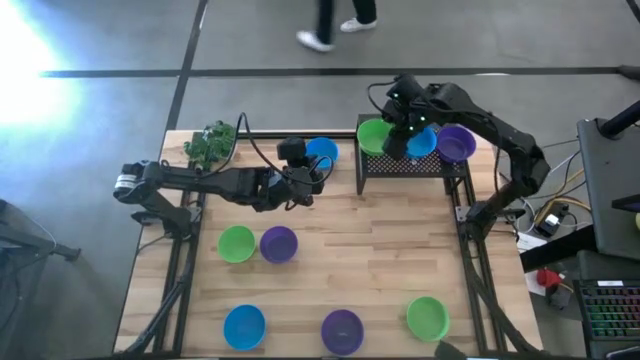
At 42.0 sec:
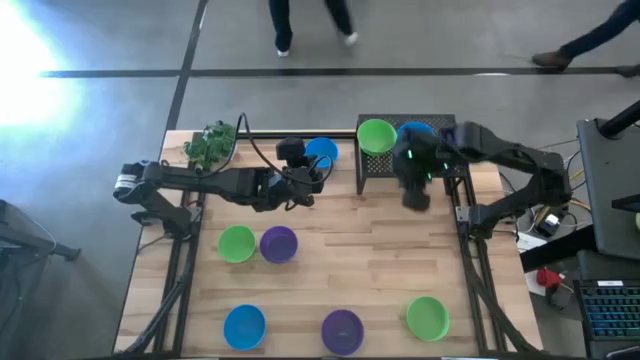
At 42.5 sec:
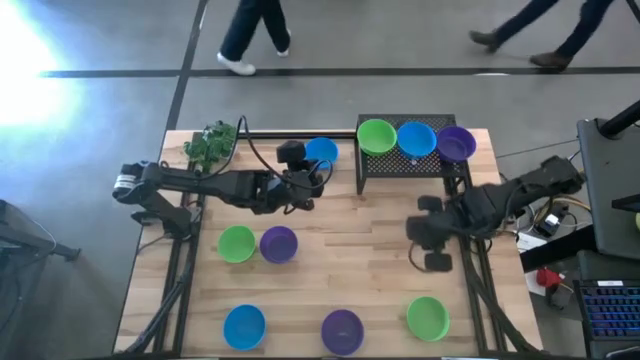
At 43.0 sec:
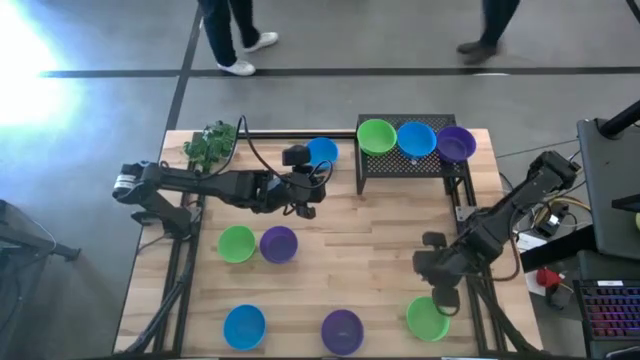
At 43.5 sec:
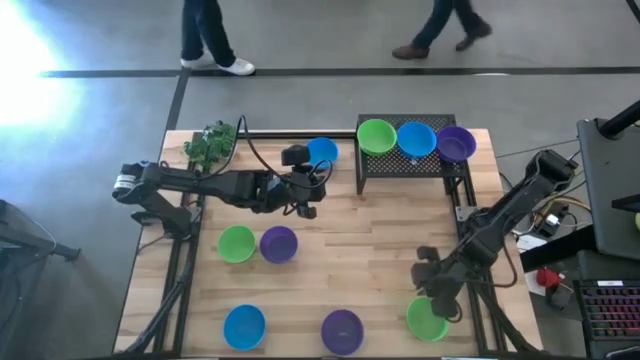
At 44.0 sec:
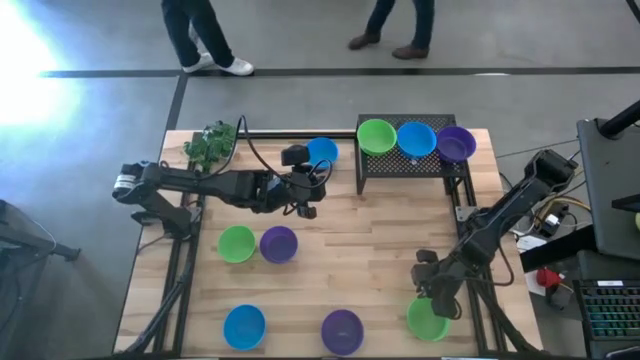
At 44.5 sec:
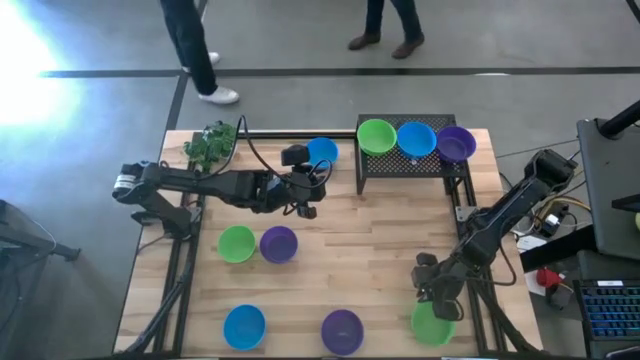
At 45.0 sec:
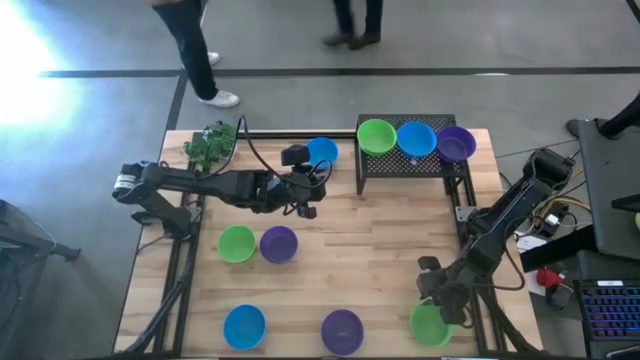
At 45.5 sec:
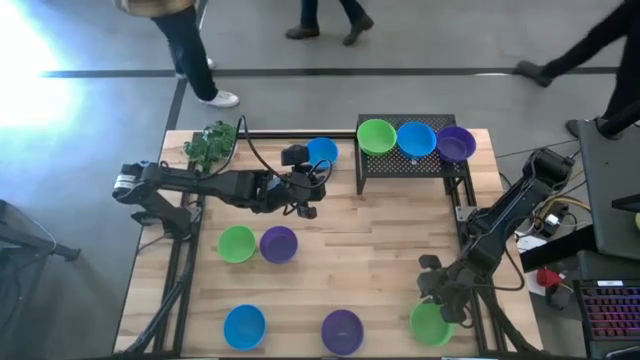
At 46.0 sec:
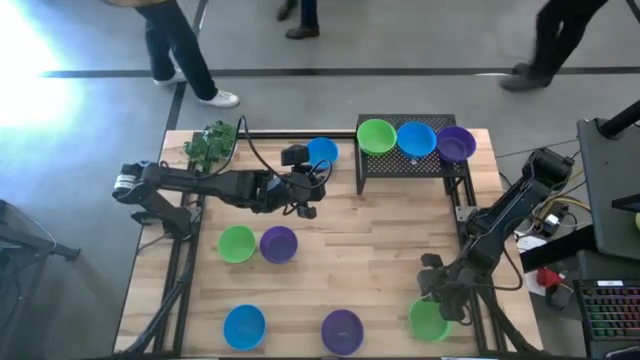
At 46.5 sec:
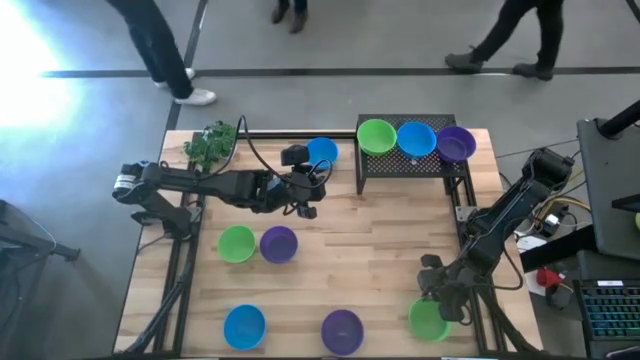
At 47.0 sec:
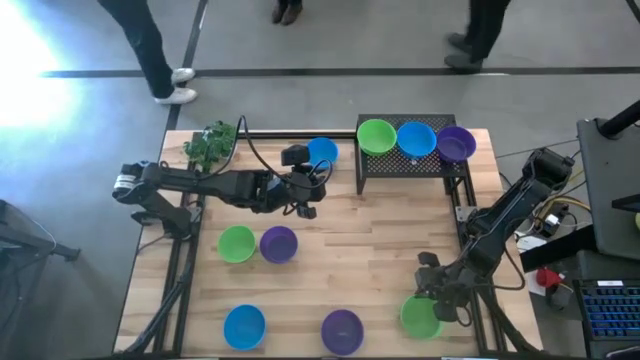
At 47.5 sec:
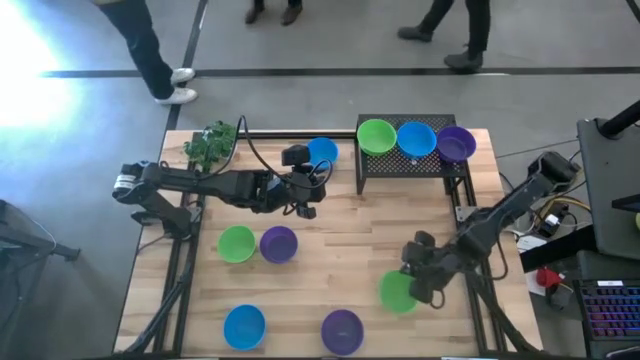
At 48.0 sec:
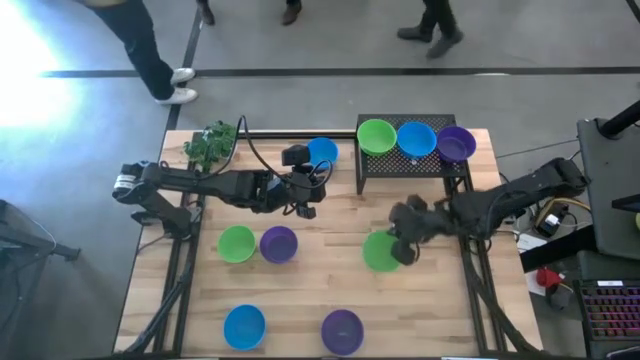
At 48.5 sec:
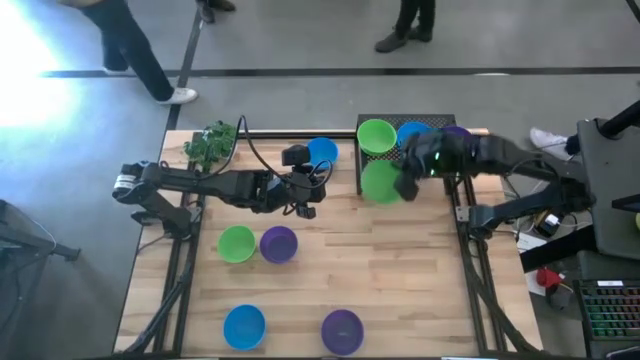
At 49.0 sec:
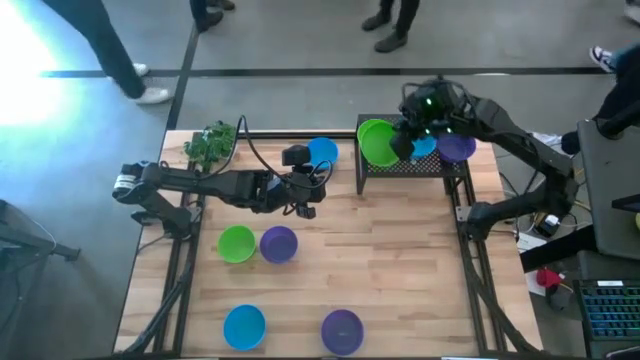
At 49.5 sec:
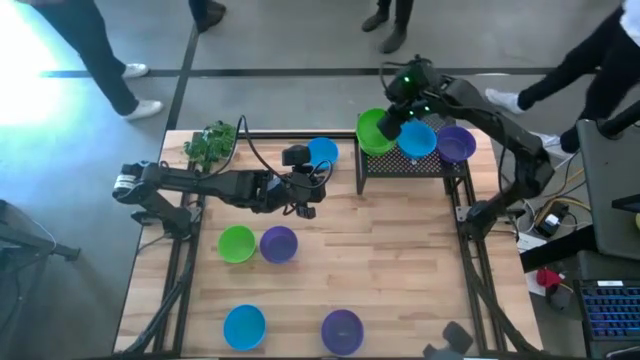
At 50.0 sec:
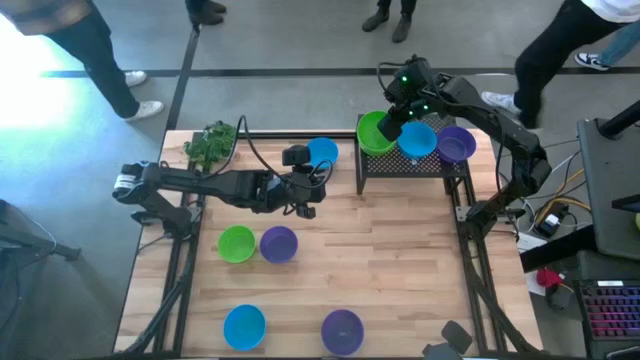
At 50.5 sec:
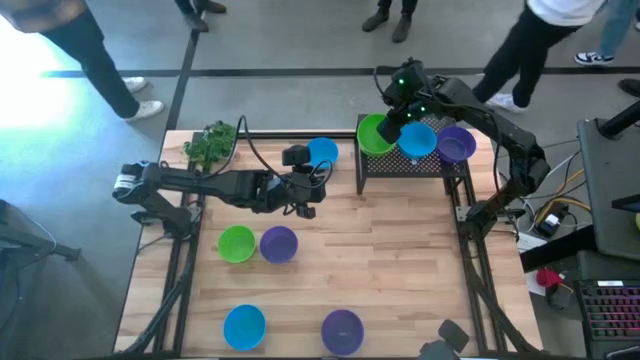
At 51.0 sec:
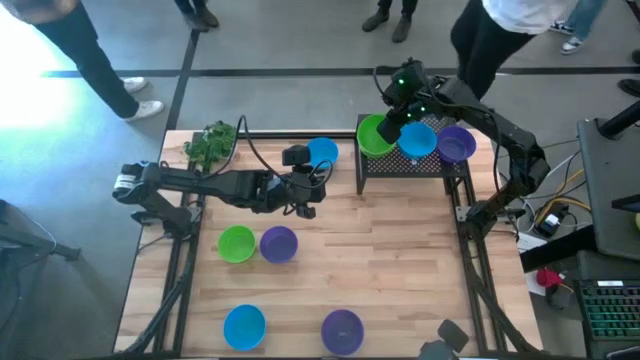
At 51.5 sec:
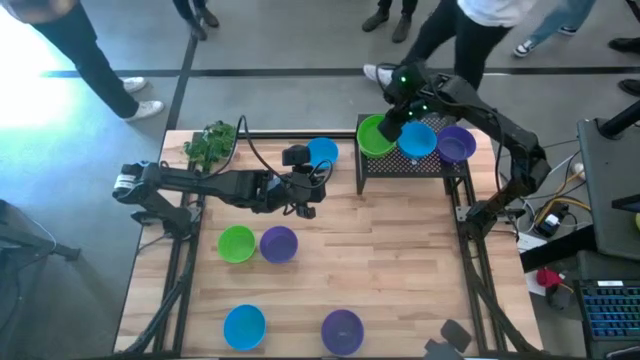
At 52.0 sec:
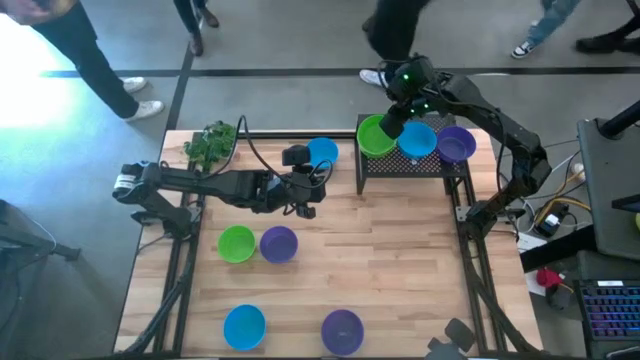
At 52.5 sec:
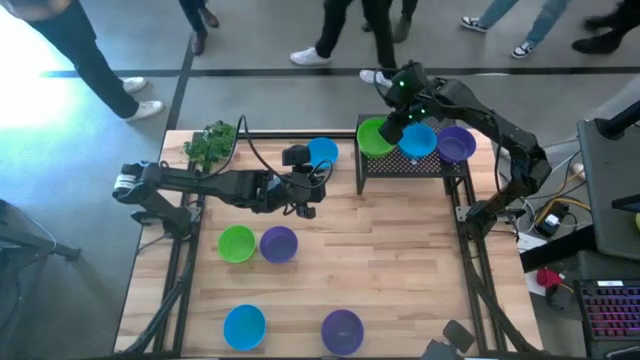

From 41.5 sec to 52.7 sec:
Task: Pick & Place Mini bowls
Stack the bottom green bowl on top of the green bowl on the shelf

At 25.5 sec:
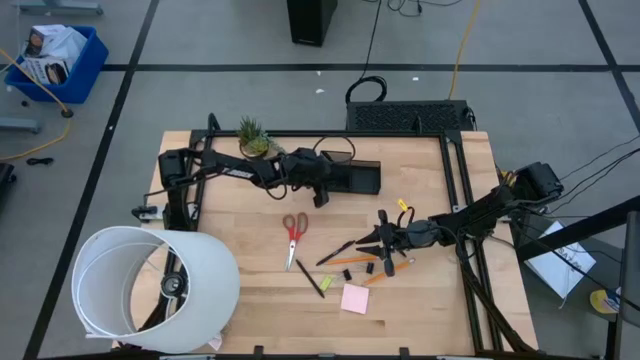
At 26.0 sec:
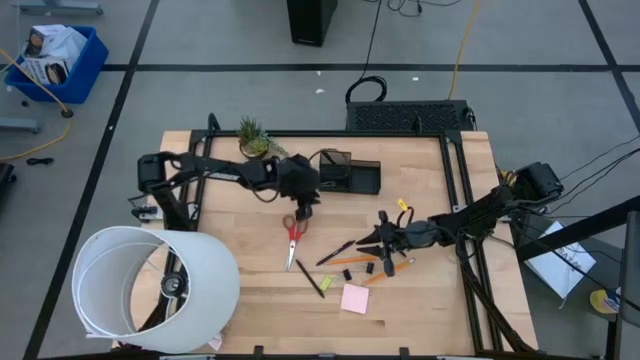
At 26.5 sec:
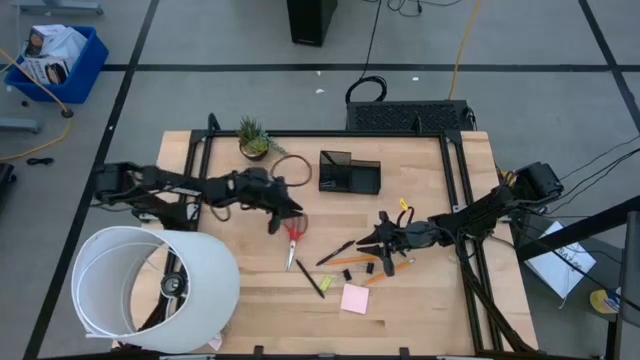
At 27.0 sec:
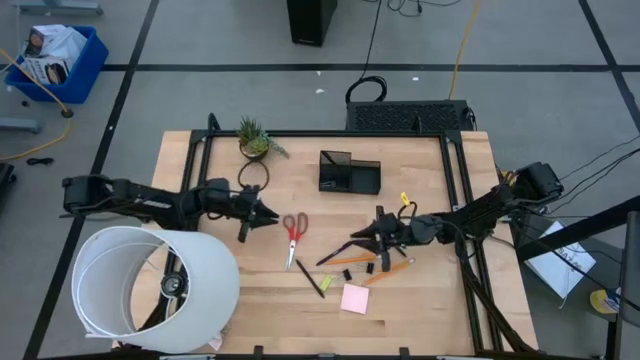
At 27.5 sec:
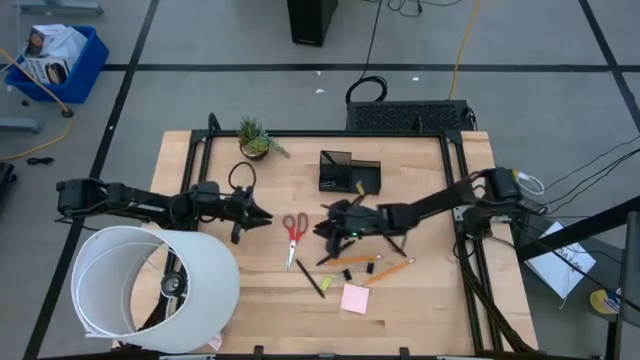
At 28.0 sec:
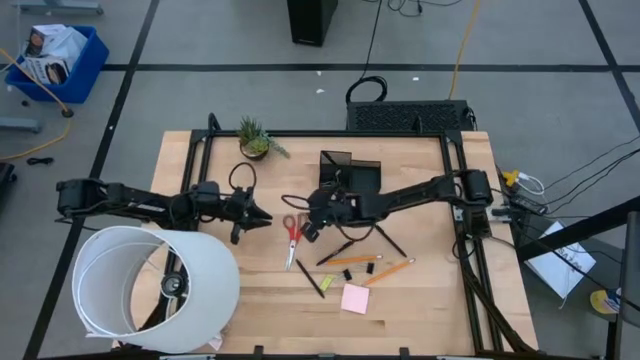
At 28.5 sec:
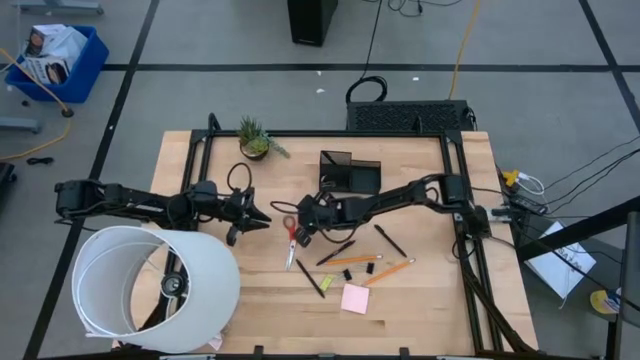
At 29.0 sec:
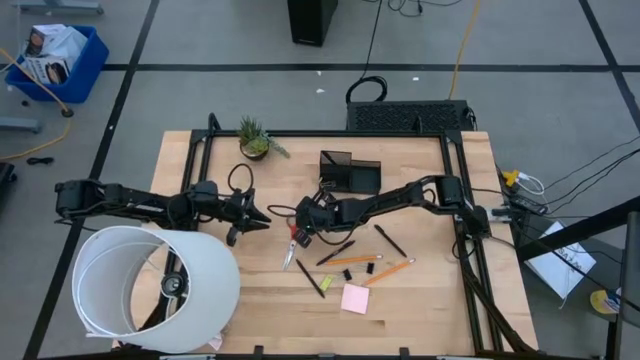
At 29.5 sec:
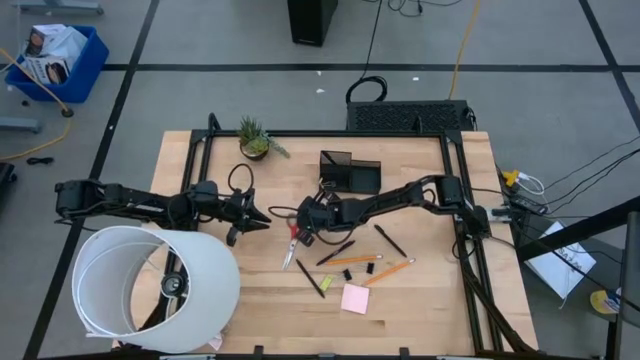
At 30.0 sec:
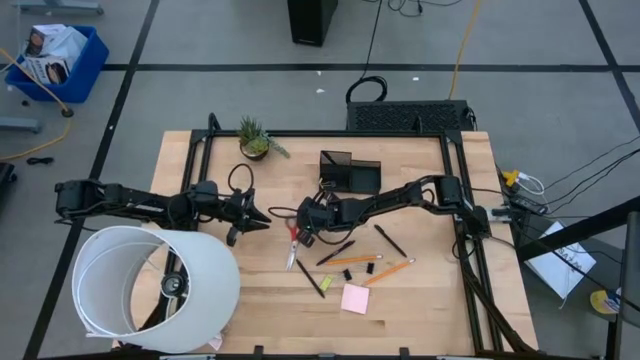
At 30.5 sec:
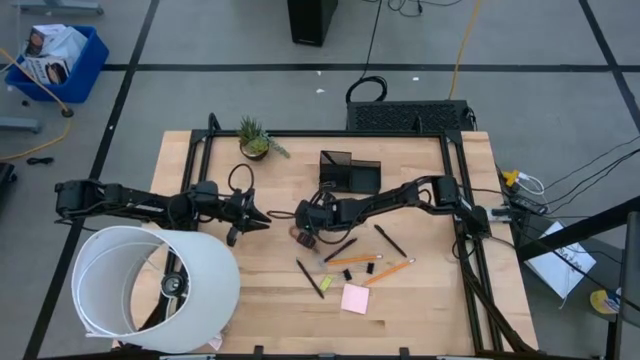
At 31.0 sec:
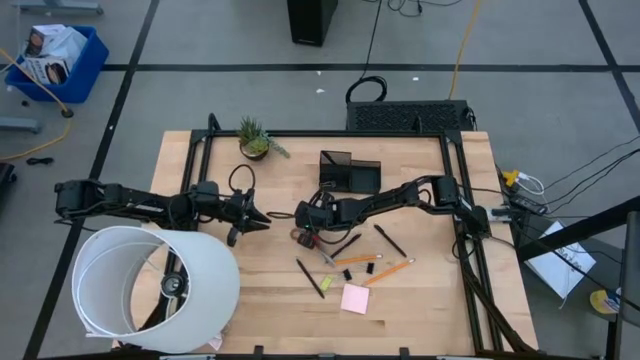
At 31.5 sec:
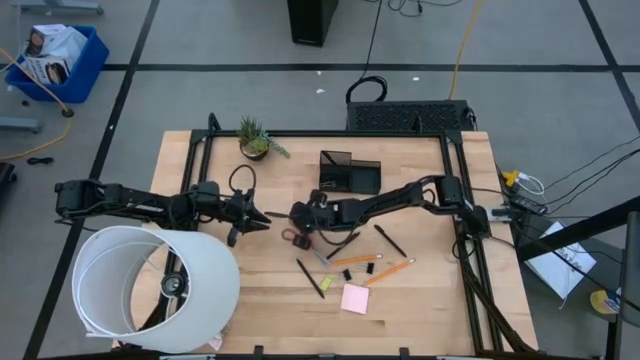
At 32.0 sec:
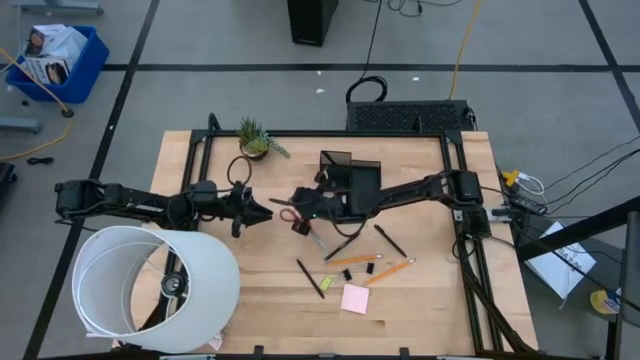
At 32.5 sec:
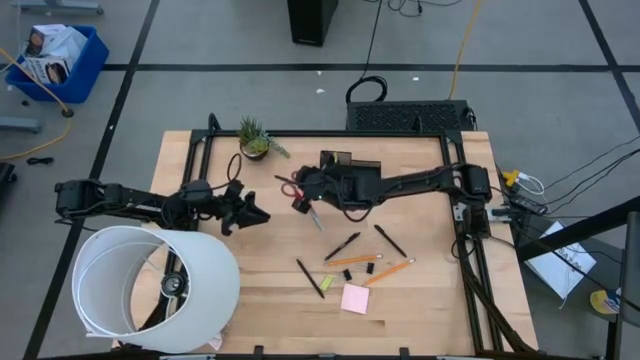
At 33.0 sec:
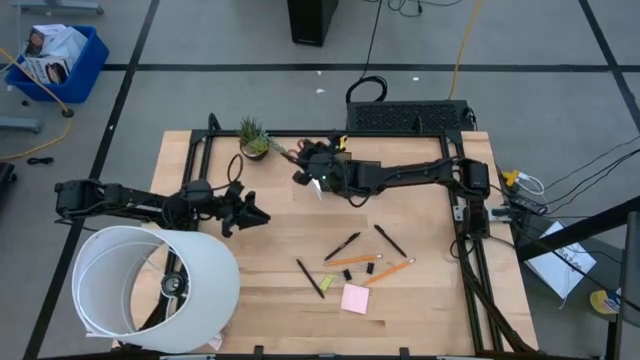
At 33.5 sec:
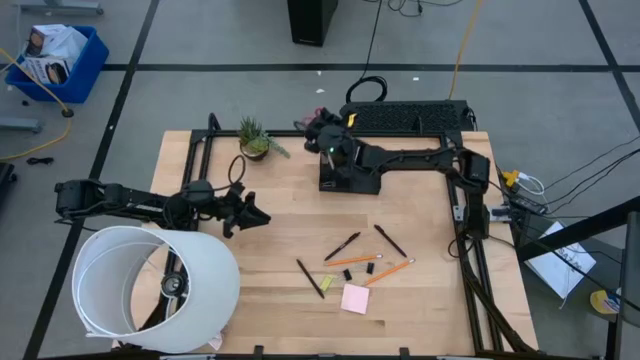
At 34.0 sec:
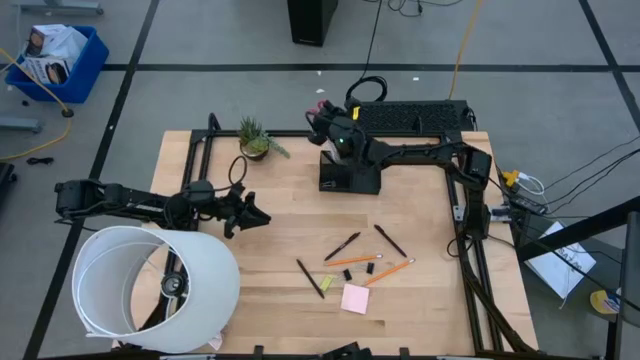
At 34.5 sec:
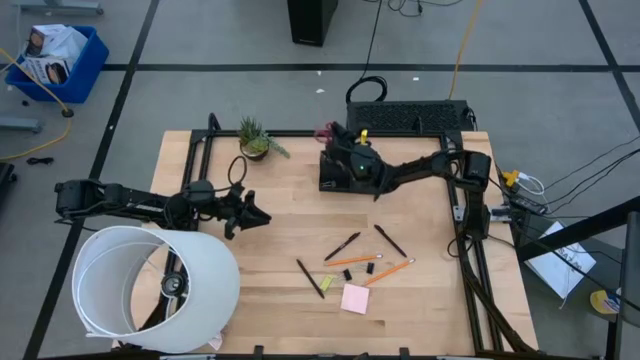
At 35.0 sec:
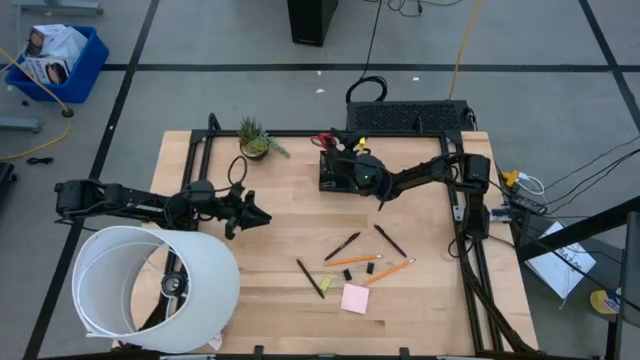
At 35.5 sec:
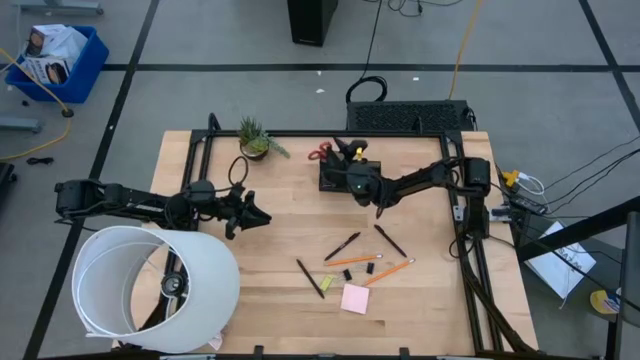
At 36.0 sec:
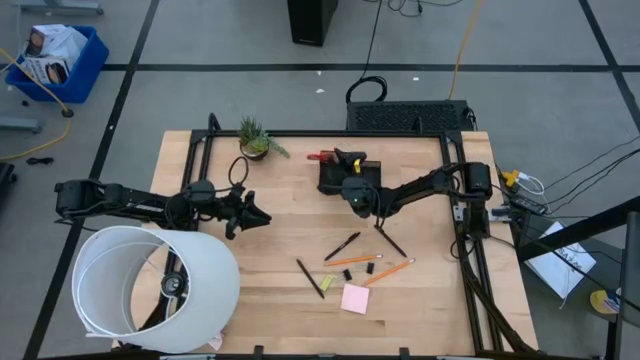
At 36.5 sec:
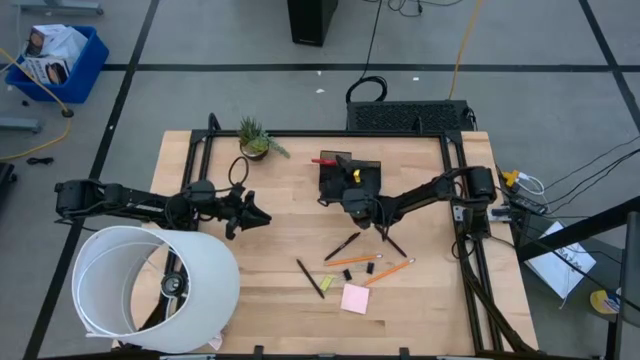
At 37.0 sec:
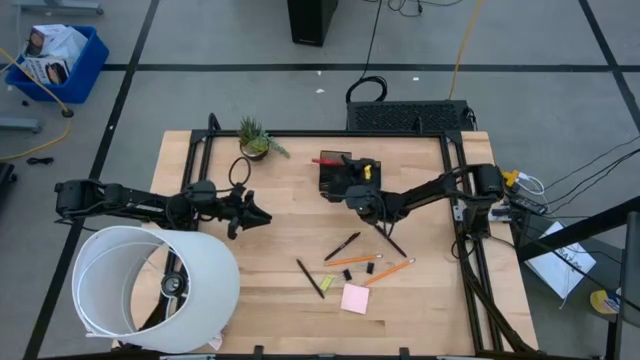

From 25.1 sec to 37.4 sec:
Task: Pick and place office supplies into organizer
Put the orange scissors into the desk organizer
